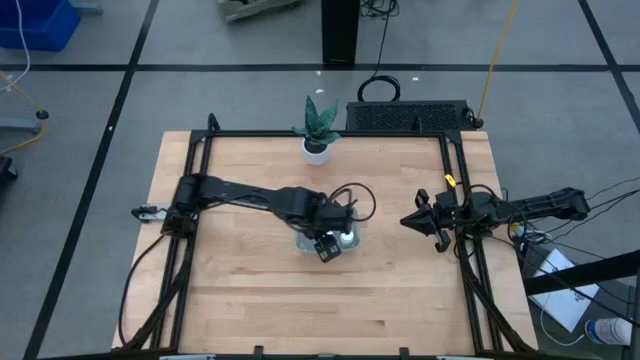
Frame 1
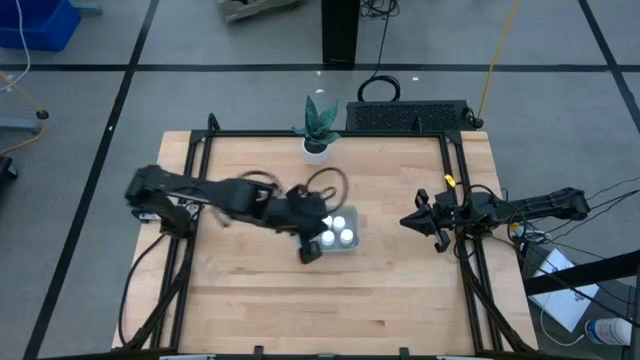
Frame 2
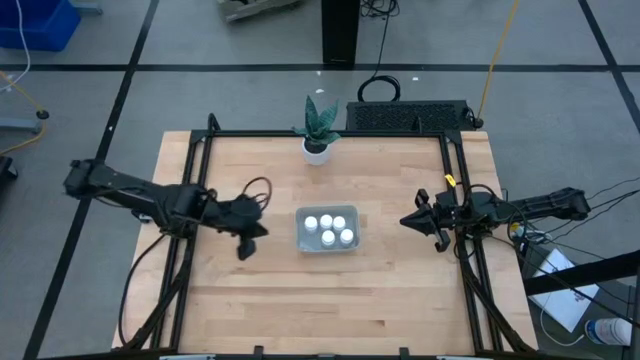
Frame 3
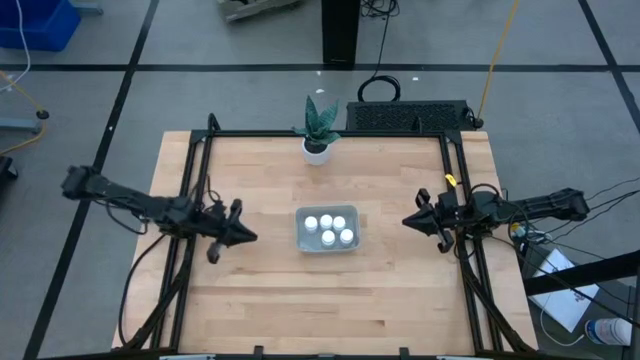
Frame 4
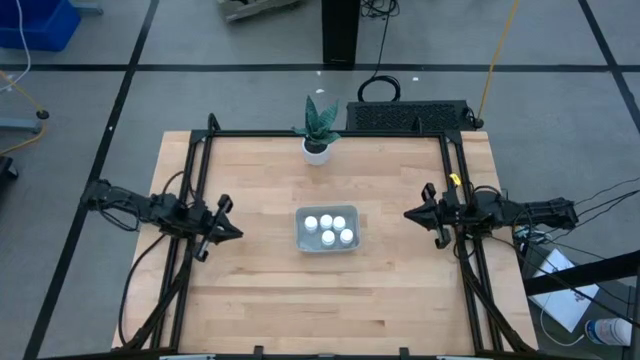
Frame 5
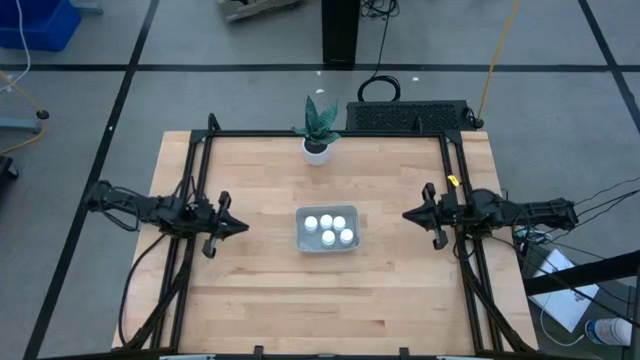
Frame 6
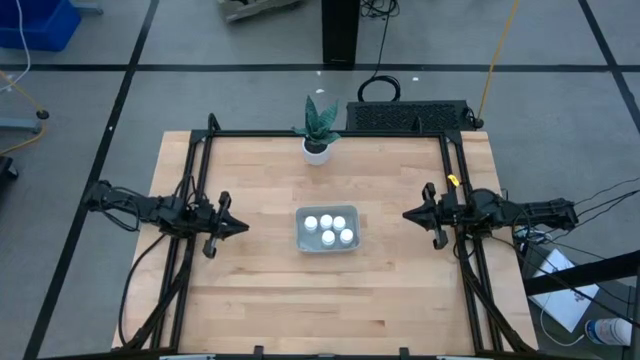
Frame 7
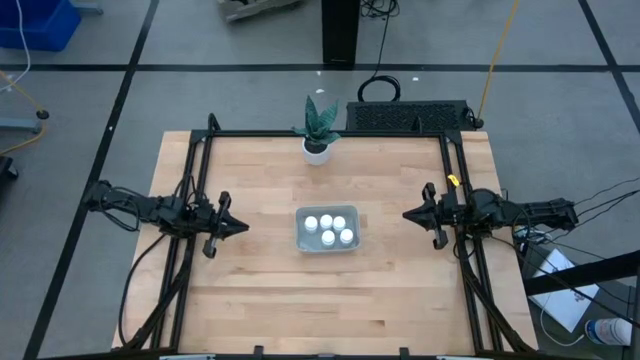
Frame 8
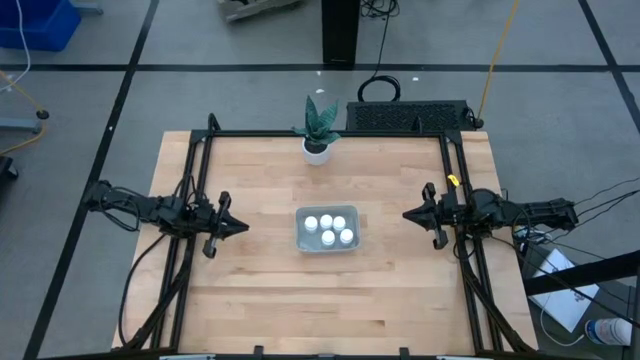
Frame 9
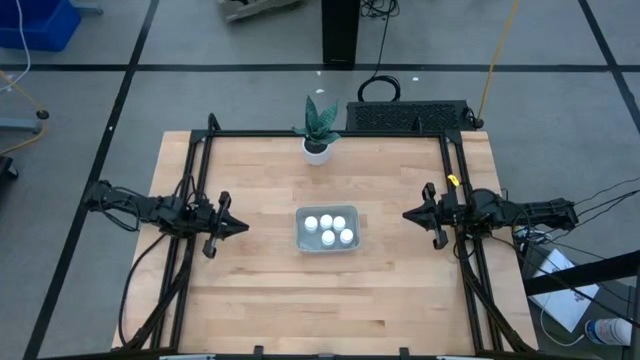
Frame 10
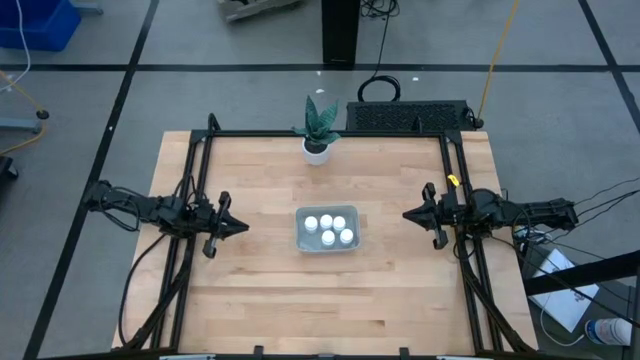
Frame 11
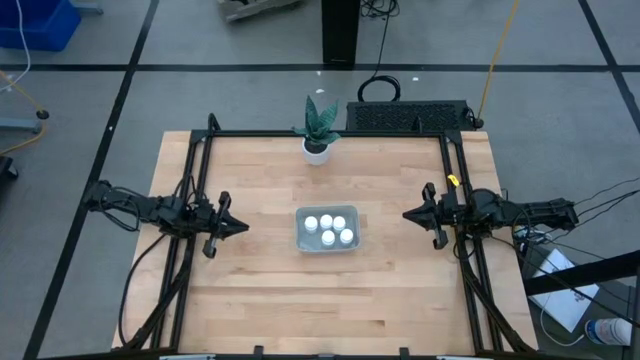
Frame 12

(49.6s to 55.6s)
Task: Pick and place pill bottles into a basket
Return to Home Position

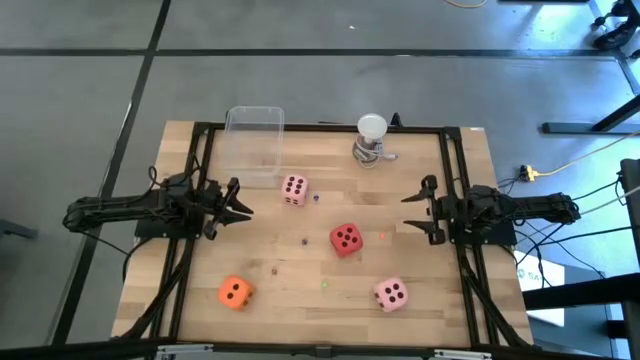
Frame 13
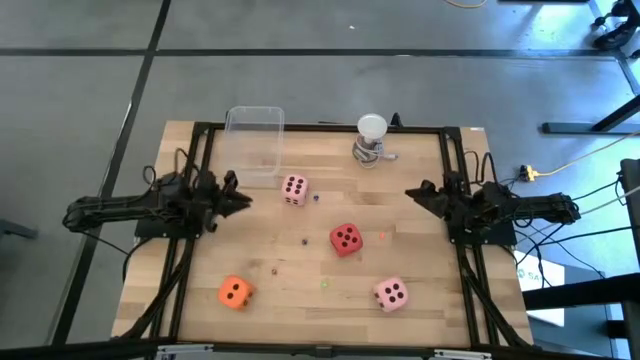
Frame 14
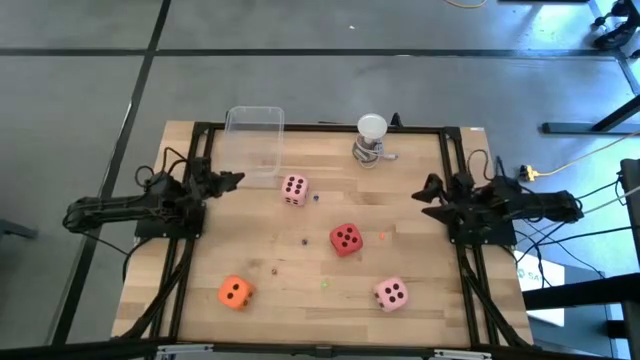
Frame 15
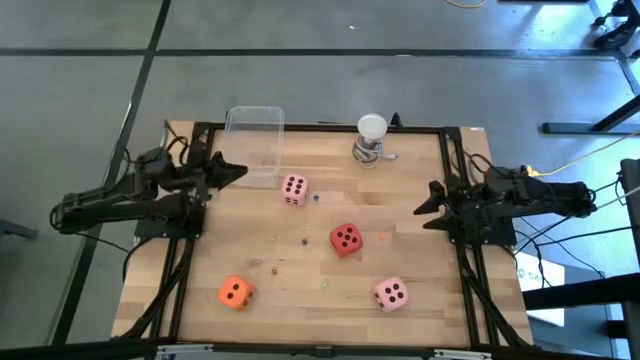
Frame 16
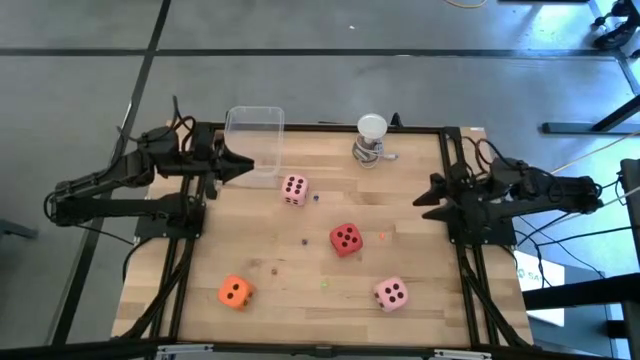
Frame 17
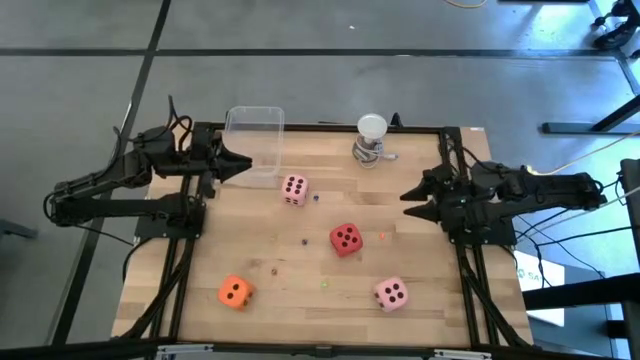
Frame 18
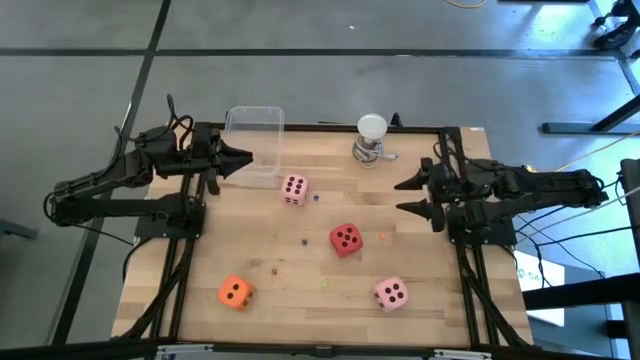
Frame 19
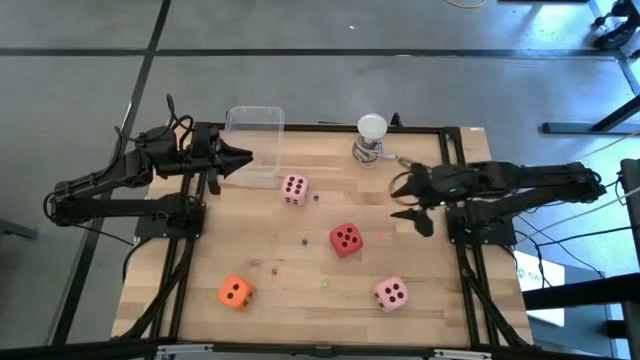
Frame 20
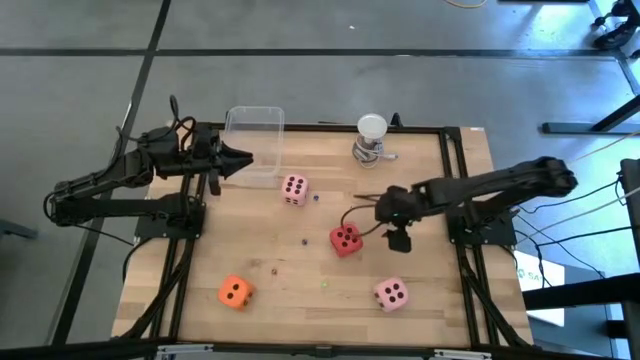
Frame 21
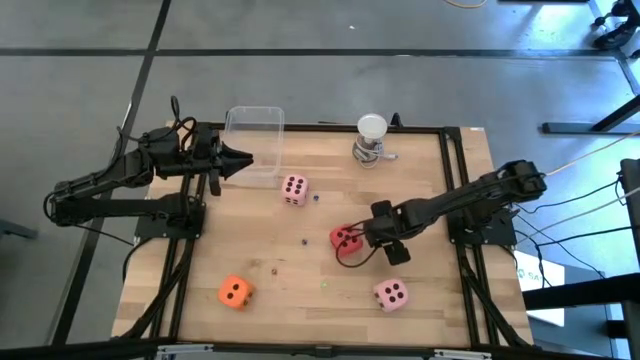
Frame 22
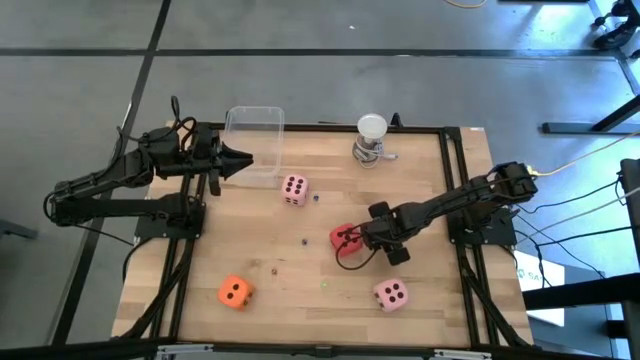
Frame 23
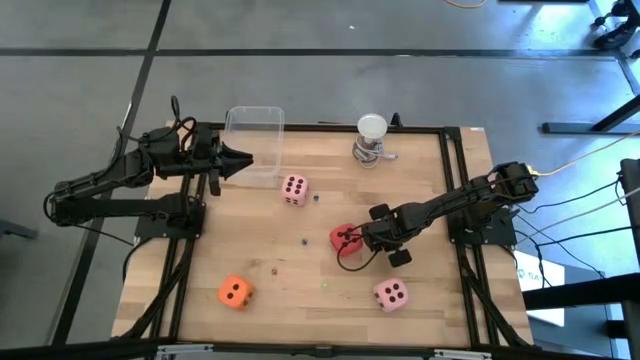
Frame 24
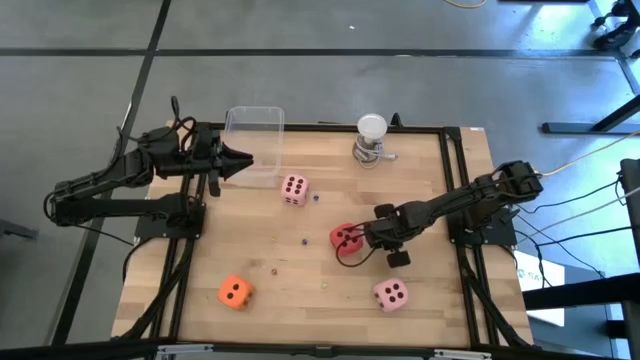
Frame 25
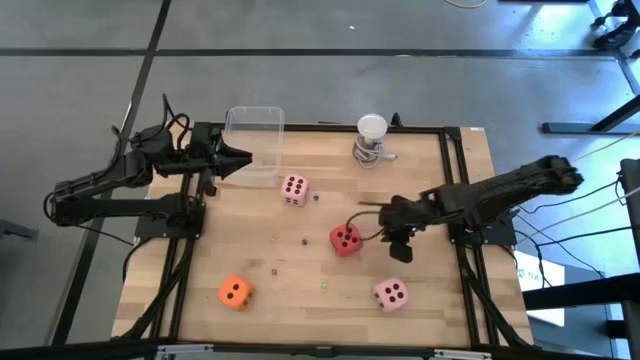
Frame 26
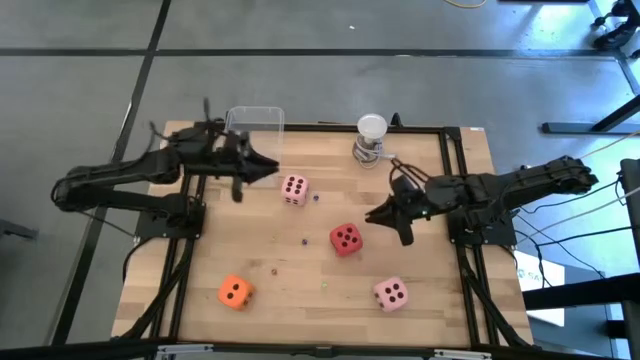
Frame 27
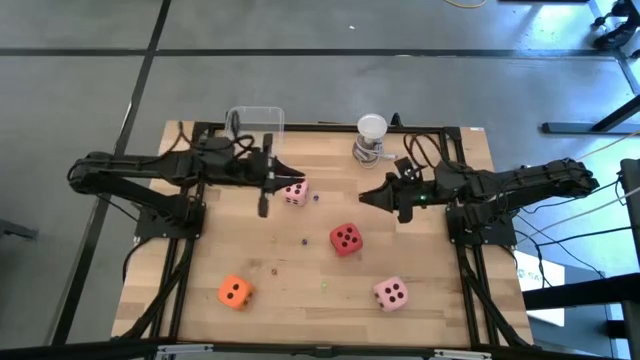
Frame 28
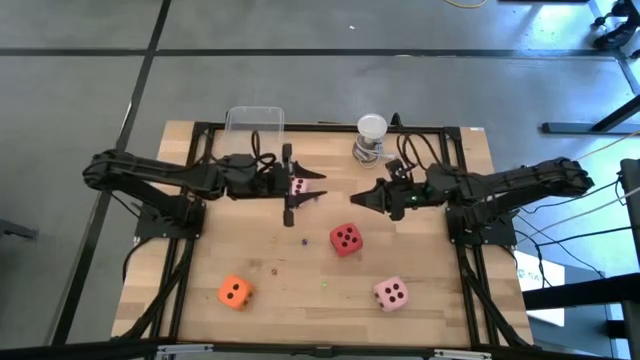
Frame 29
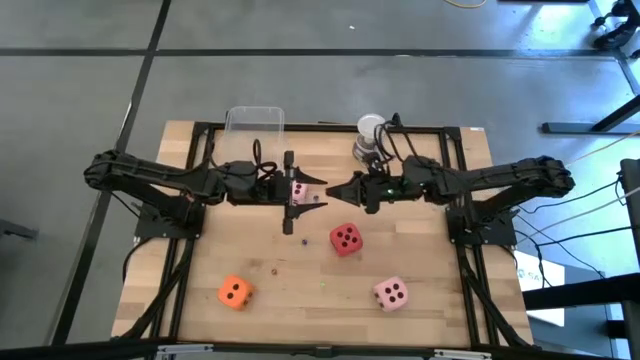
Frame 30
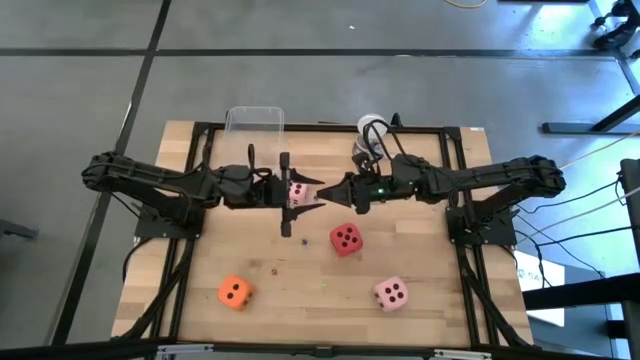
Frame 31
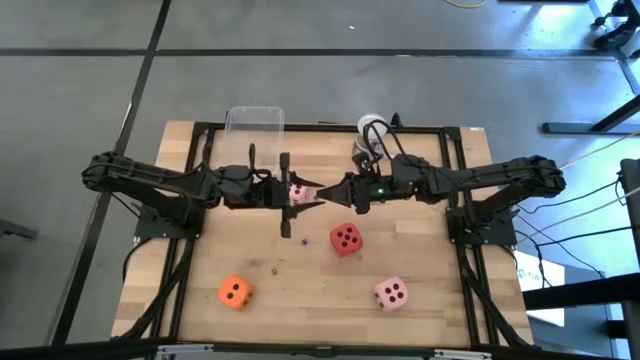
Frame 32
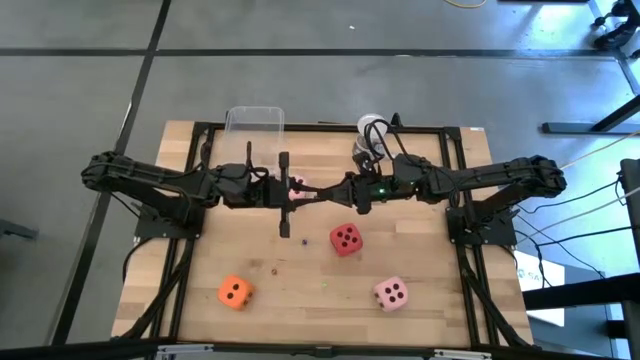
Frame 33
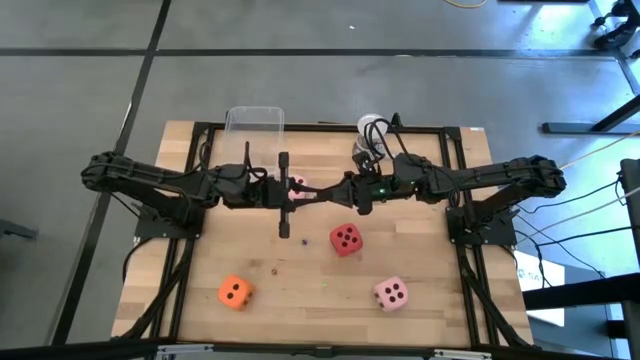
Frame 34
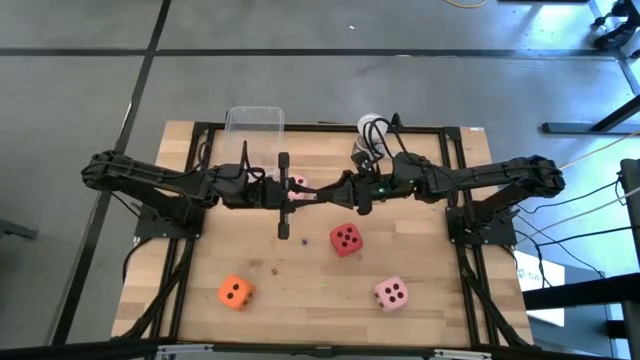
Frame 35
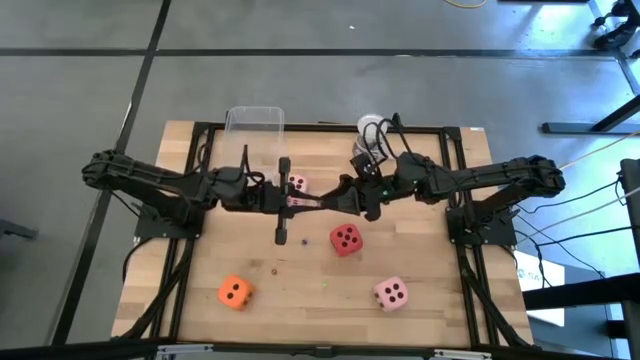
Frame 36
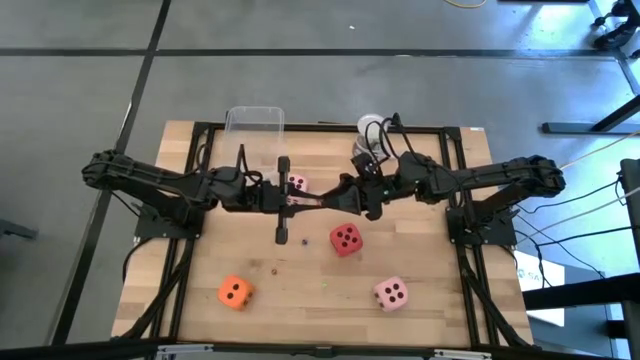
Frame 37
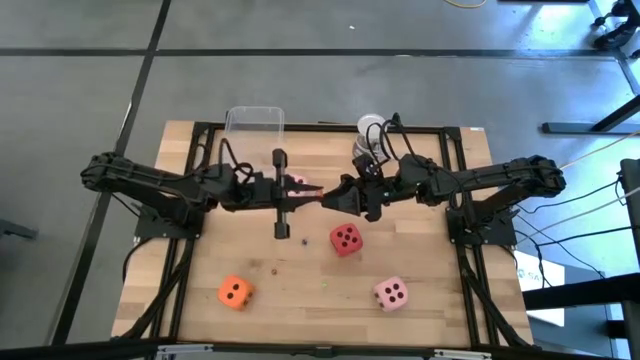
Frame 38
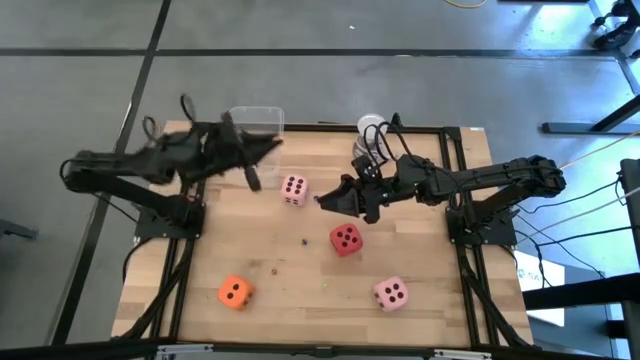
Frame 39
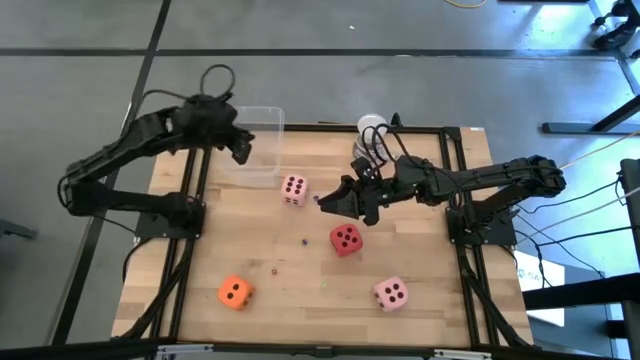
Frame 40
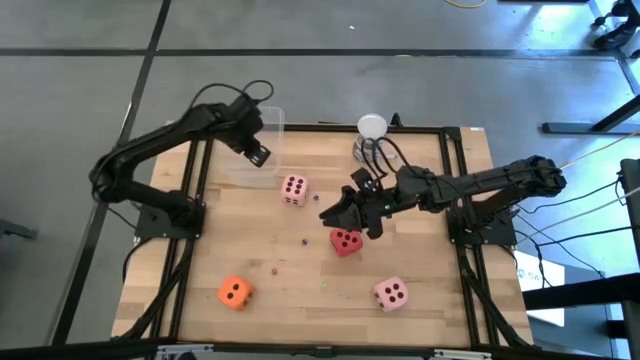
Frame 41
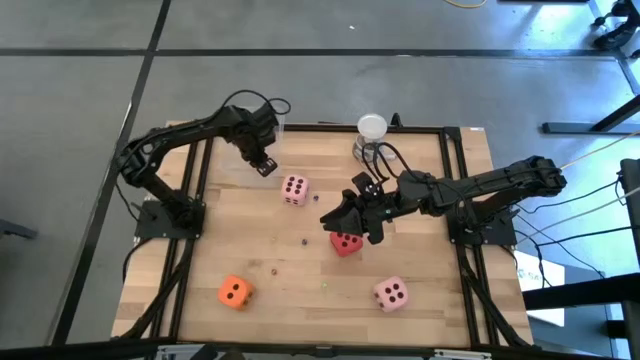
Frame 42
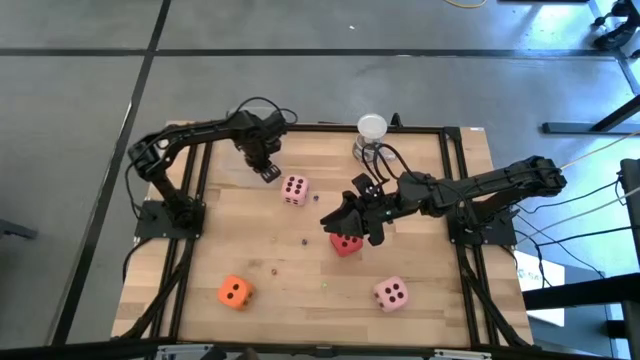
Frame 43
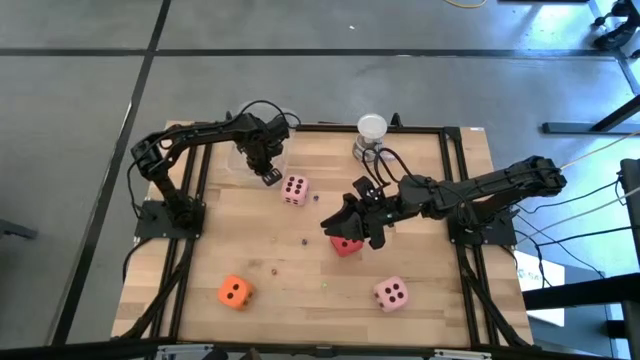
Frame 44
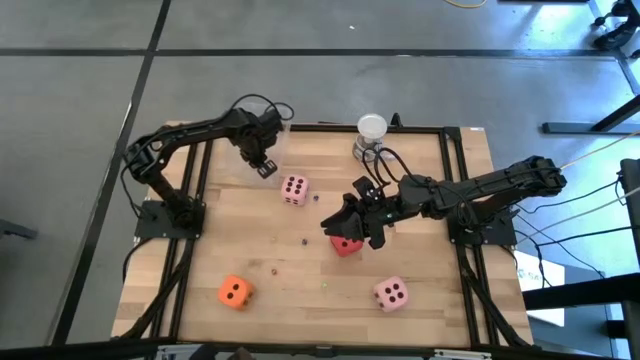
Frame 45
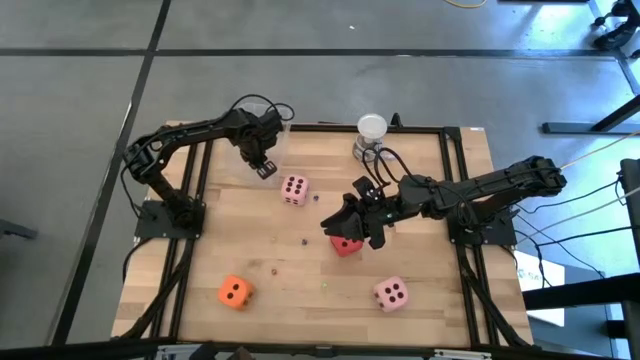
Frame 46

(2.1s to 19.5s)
Task: Pick & Place Dice
Put the small orange dice in the transparent bin
